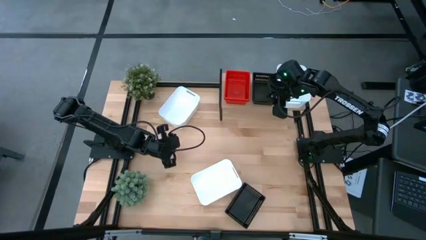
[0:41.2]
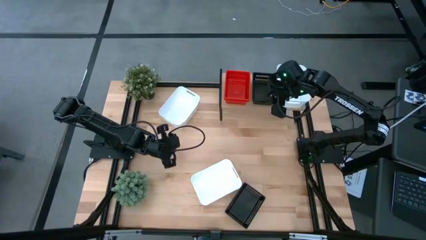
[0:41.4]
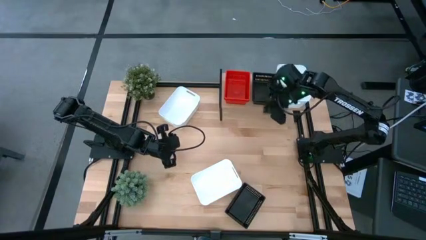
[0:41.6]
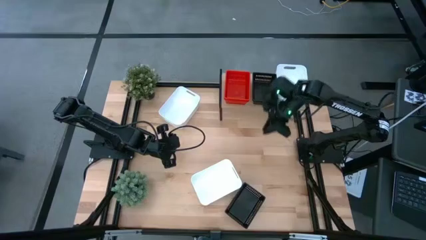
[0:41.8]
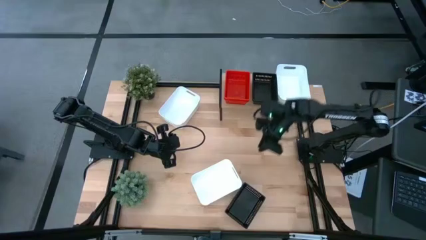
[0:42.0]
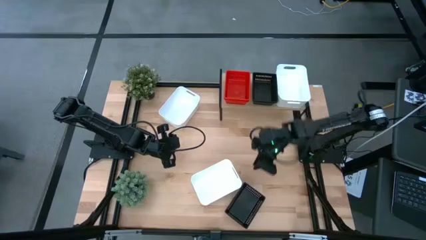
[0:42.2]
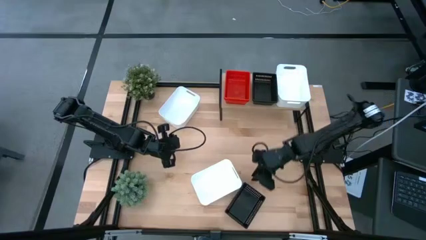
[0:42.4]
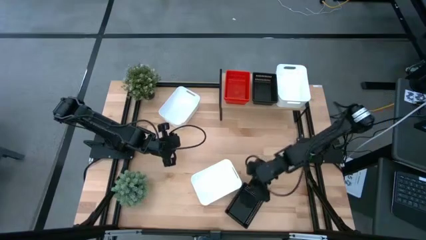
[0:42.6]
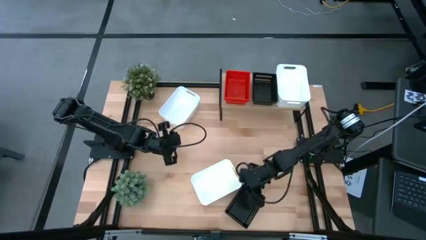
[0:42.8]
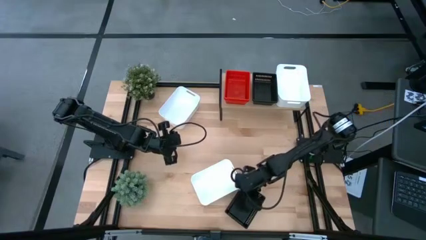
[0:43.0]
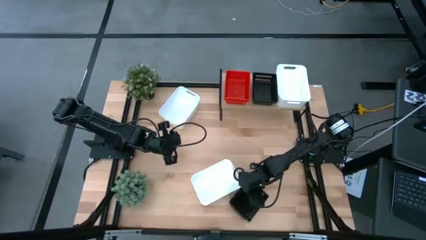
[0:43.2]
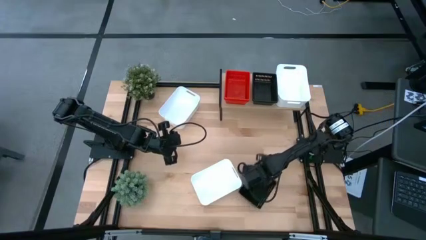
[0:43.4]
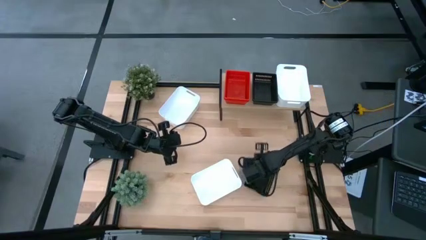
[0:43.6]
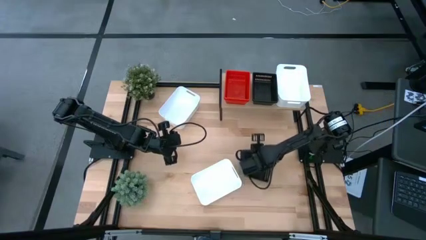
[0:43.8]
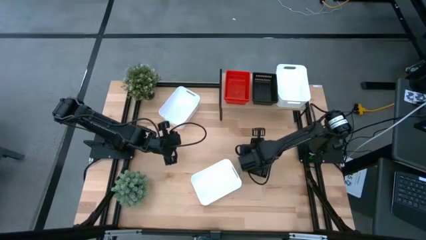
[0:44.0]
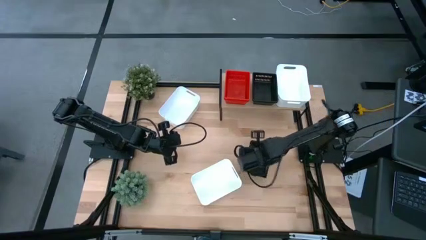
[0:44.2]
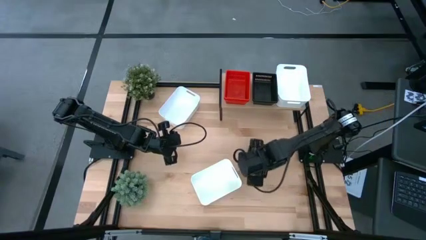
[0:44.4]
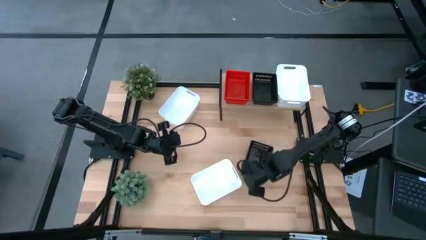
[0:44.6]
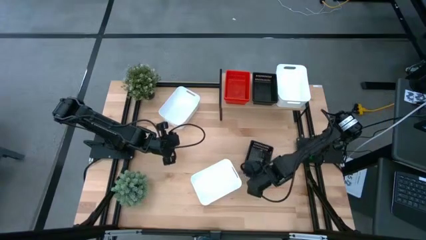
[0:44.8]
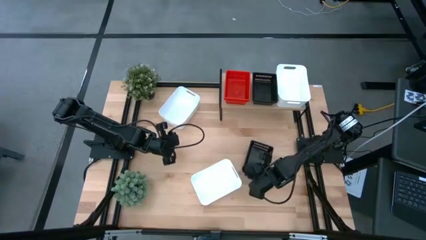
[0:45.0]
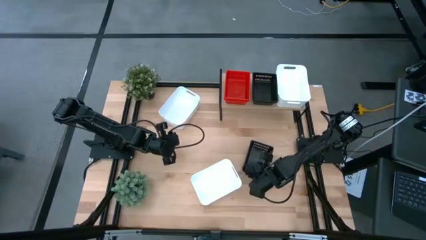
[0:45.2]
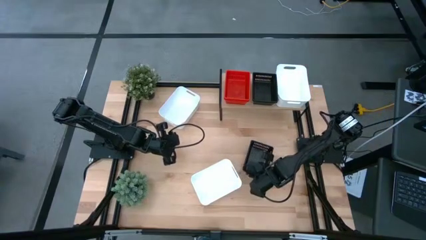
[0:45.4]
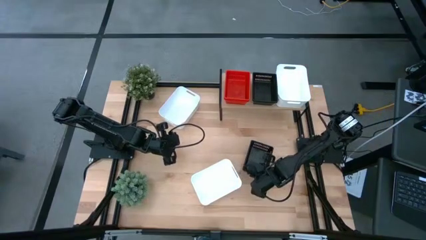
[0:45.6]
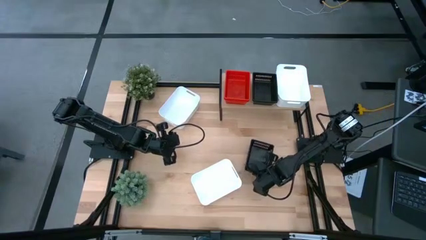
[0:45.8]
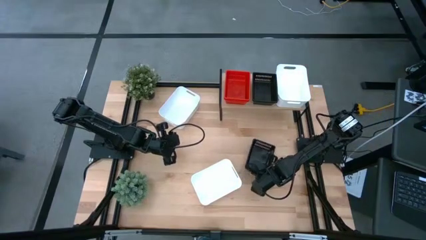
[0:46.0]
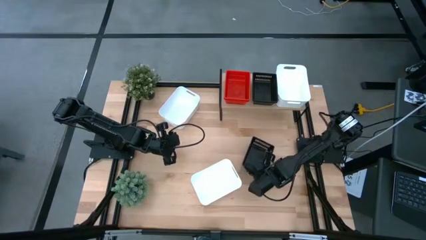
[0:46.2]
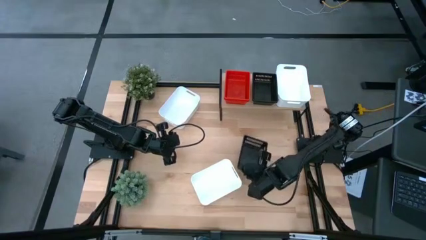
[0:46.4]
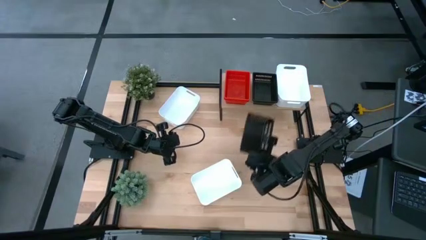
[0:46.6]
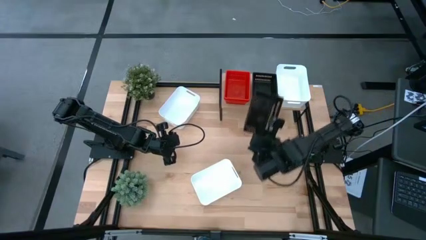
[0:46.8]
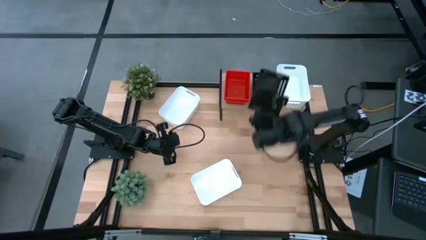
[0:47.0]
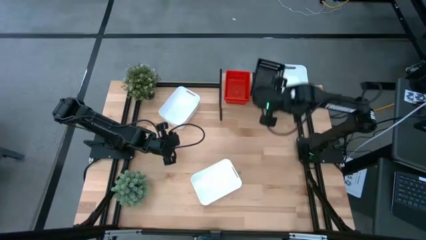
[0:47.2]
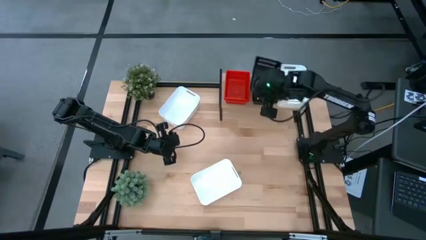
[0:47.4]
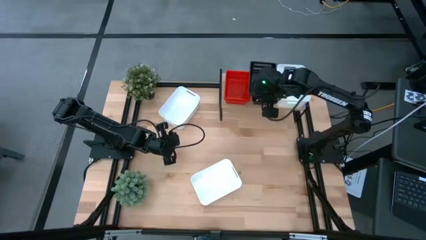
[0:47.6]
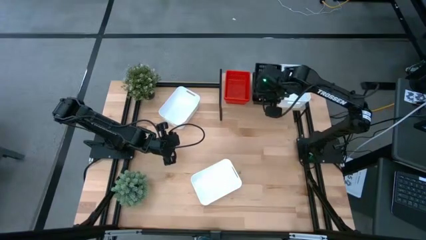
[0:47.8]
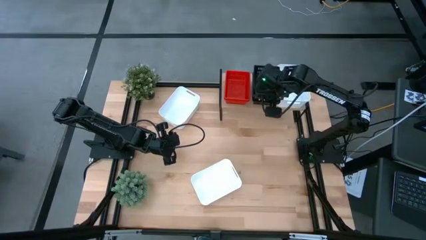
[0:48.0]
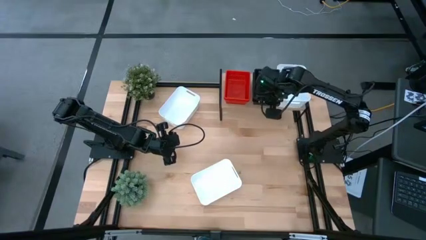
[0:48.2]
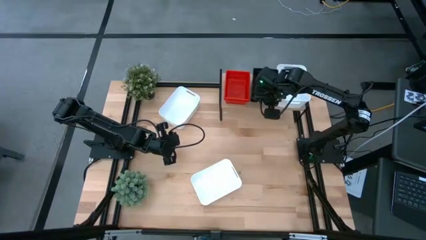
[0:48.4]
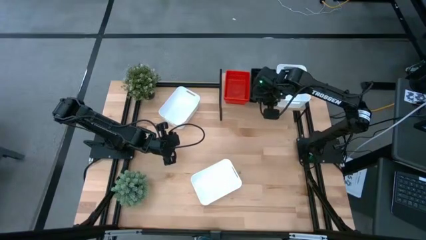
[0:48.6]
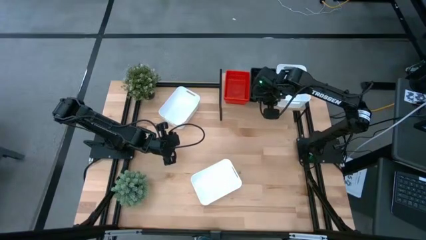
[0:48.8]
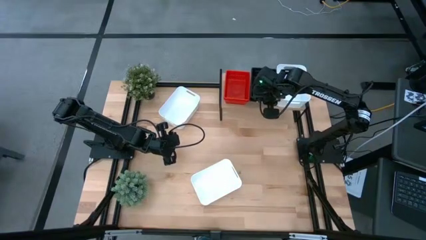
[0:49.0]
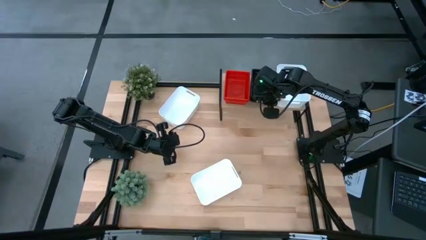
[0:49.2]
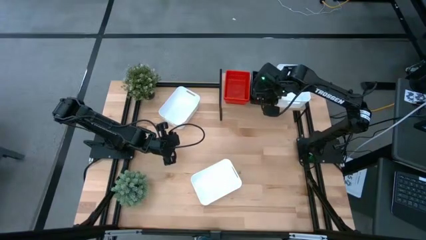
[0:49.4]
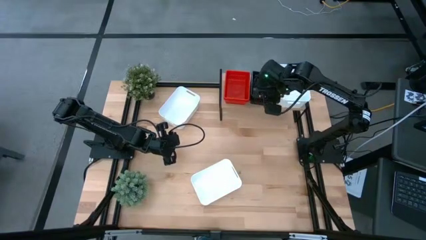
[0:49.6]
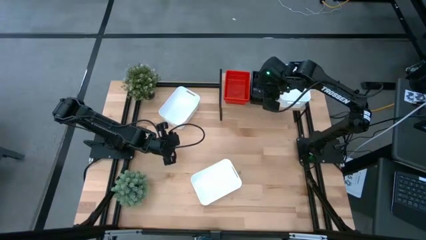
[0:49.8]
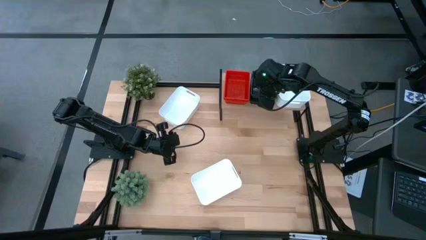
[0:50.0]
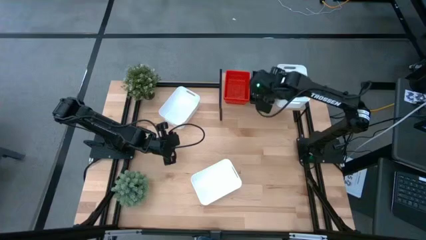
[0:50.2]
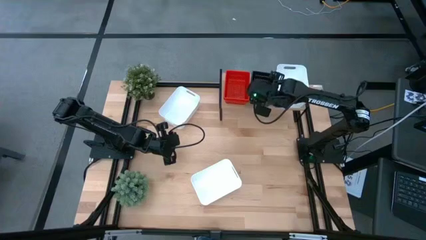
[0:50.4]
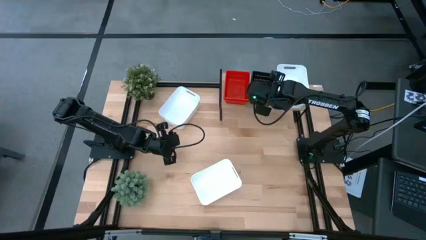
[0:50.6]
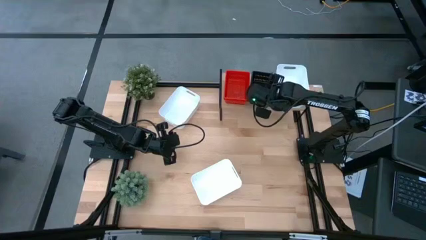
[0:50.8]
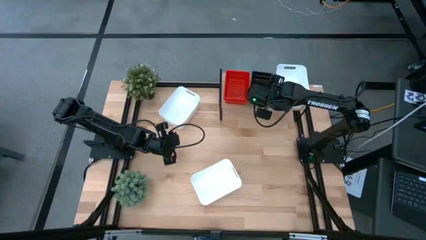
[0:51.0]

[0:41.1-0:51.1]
Task: Stack baskets on shelf by color
Stack the black bin on the top of the black bins on the shelf

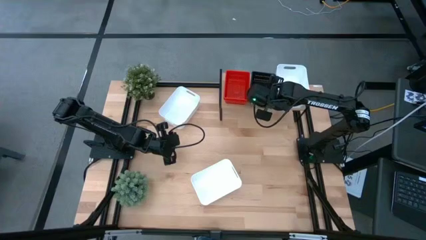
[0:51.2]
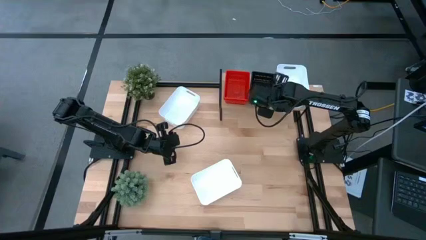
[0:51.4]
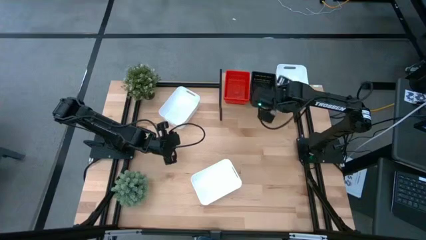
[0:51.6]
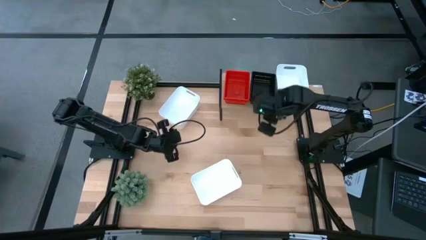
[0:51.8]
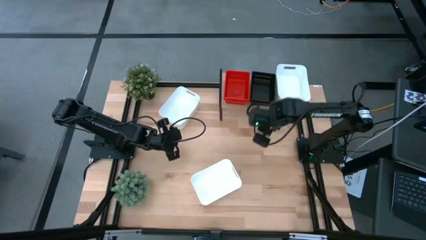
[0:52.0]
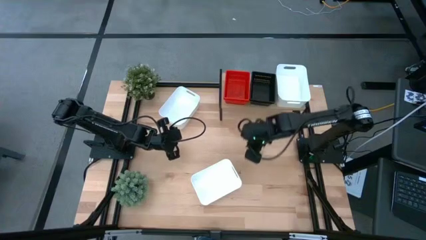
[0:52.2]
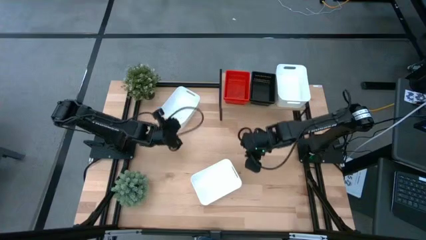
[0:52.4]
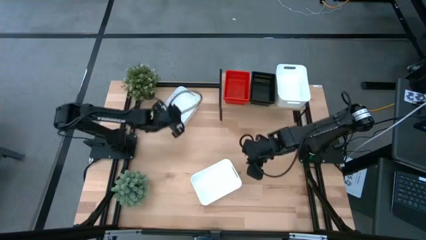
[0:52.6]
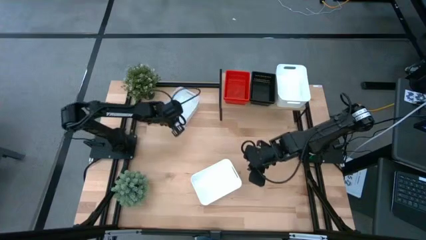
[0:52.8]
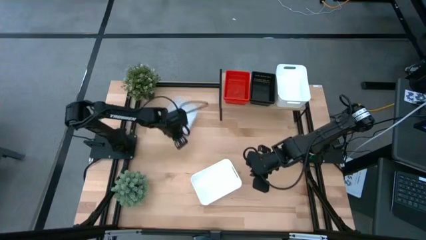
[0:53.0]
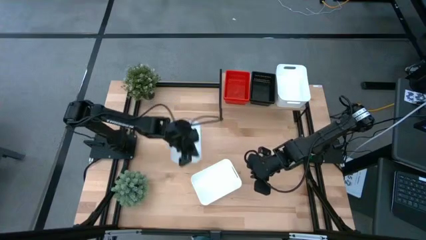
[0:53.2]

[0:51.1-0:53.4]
Move the top white bin to the center of the table

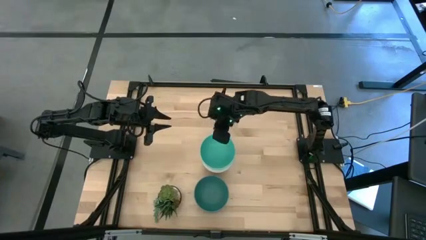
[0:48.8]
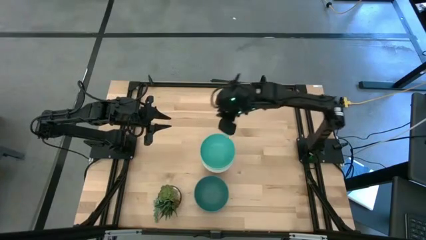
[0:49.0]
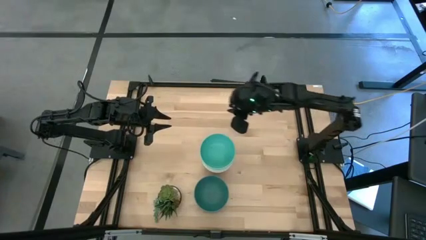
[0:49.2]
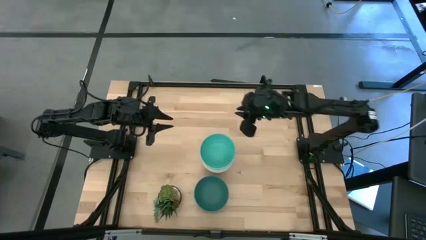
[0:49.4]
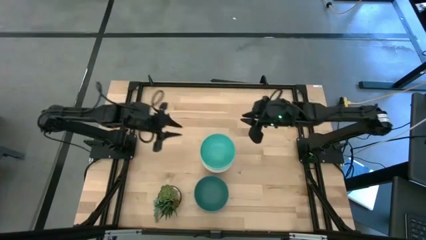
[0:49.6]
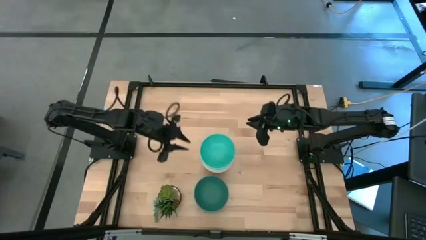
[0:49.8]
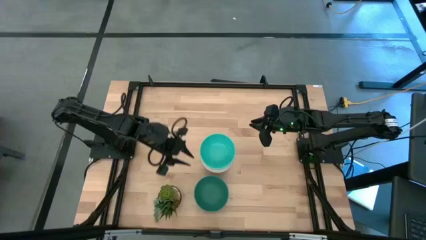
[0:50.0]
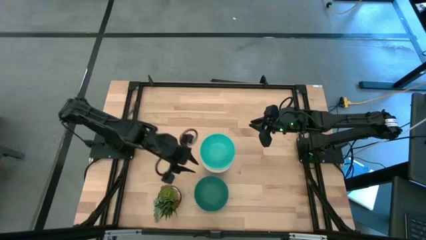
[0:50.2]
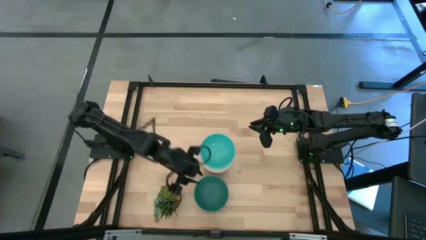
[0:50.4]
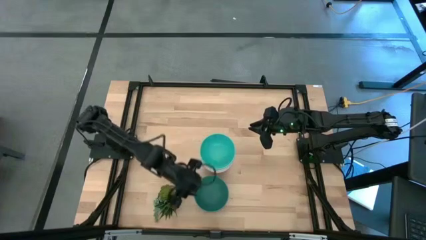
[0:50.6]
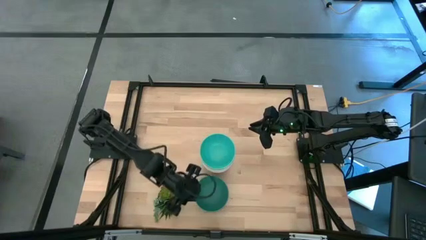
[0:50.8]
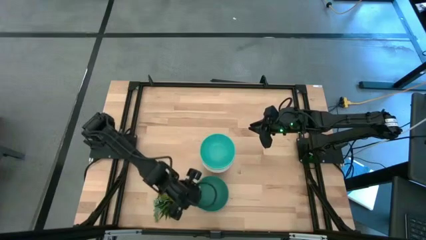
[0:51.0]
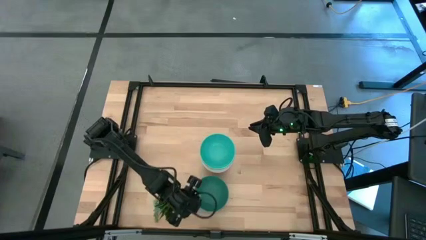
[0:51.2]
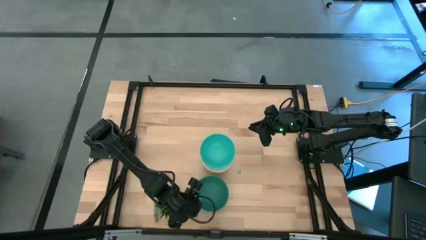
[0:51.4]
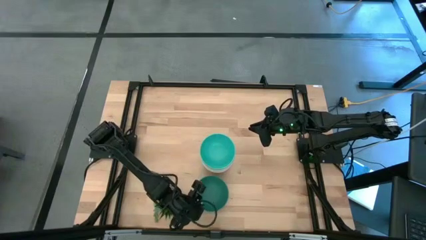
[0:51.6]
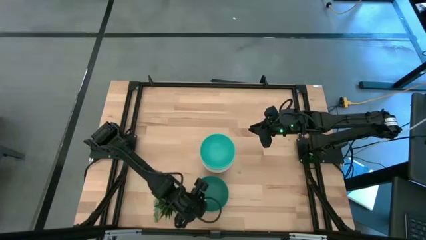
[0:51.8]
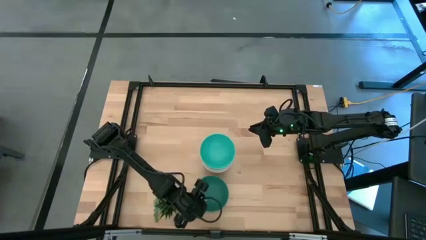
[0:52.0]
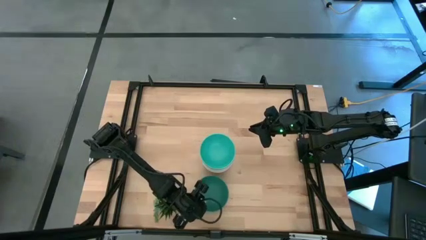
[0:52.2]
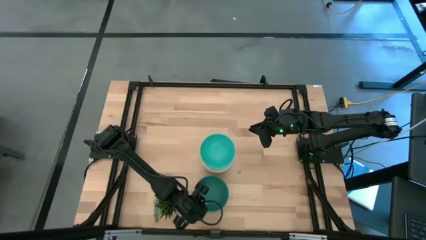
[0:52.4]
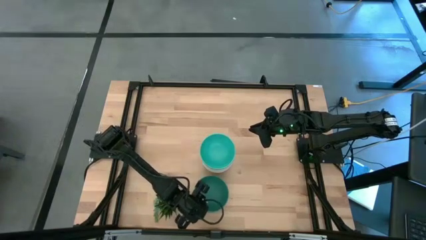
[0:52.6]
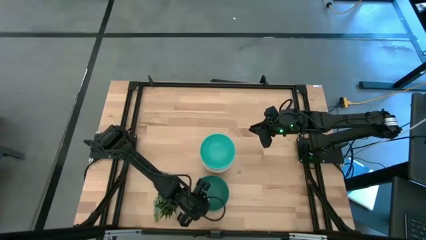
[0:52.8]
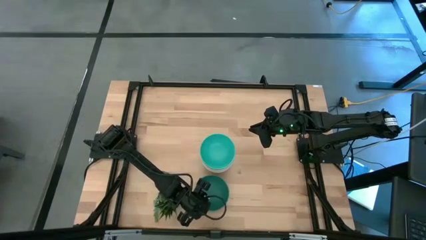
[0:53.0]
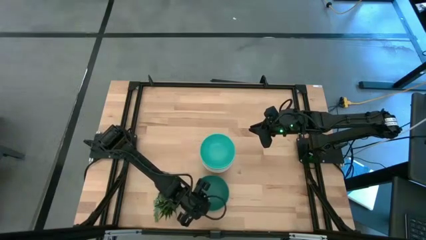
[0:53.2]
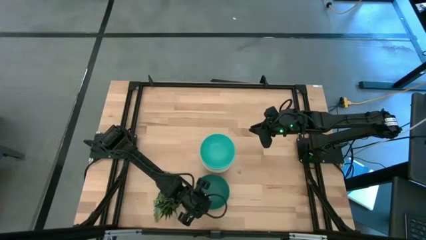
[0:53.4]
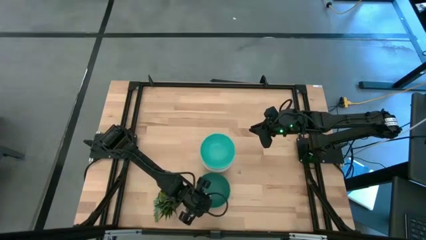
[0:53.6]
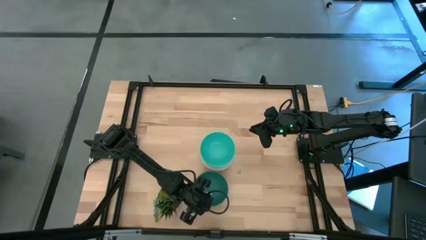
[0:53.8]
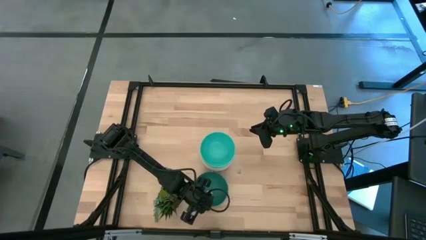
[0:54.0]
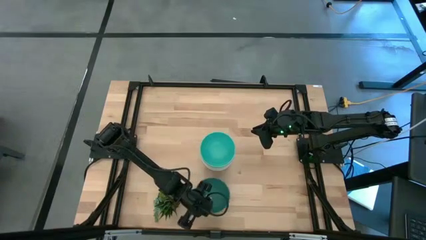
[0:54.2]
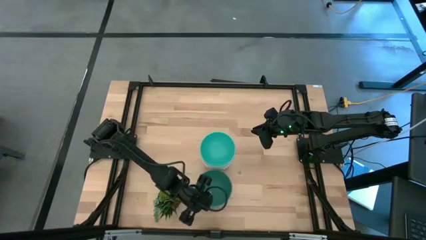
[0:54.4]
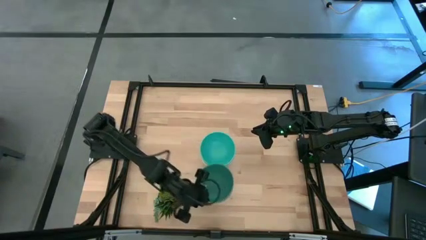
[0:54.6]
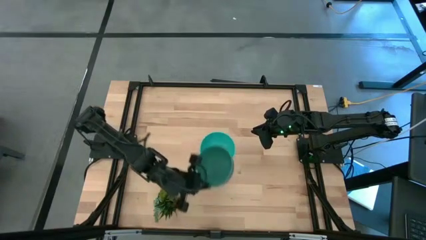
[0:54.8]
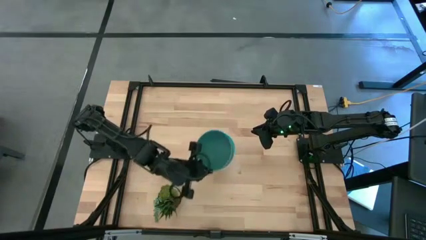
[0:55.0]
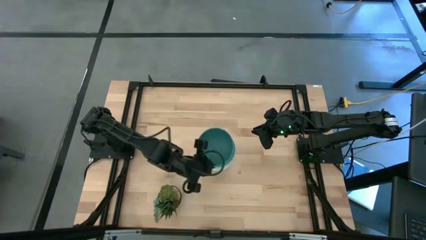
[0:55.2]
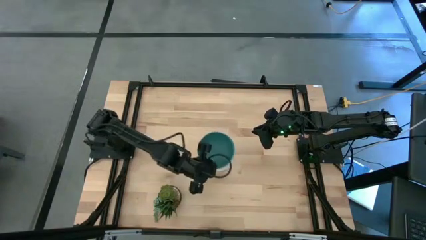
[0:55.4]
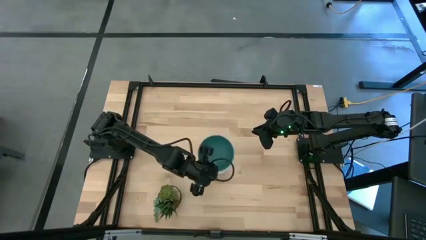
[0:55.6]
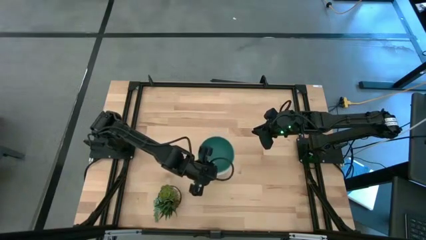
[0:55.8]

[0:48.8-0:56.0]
Task: Nest bowls inside each other
Stack the green bowl on the blue bowl
